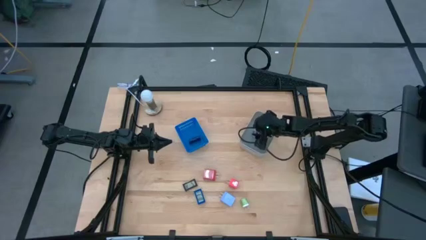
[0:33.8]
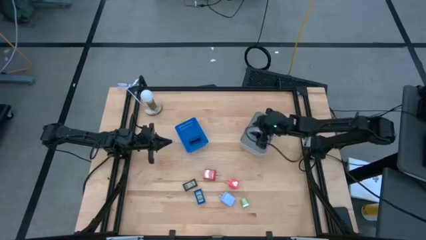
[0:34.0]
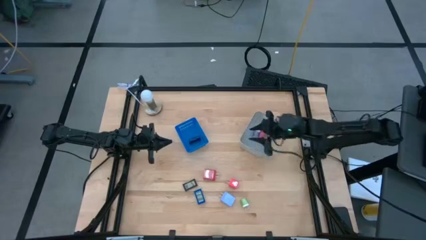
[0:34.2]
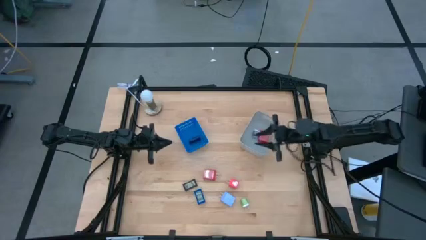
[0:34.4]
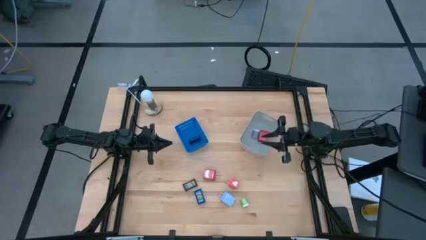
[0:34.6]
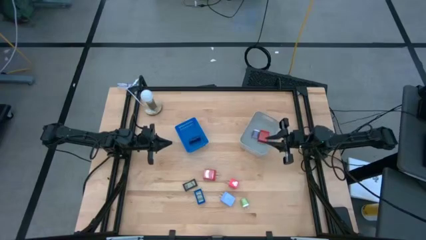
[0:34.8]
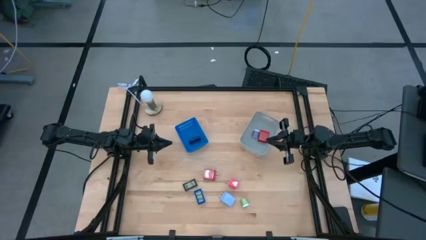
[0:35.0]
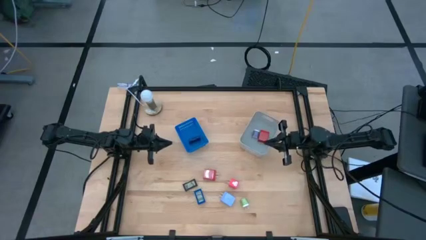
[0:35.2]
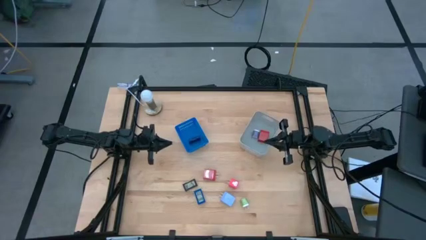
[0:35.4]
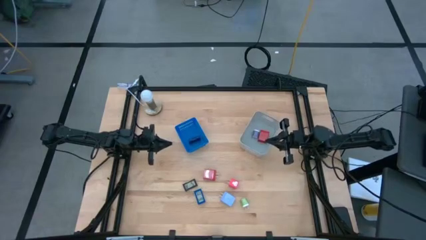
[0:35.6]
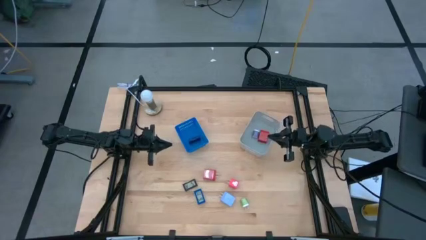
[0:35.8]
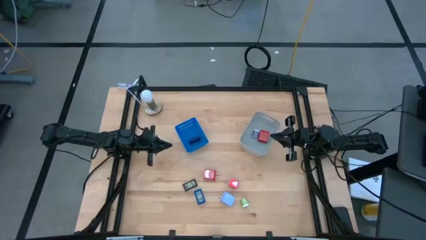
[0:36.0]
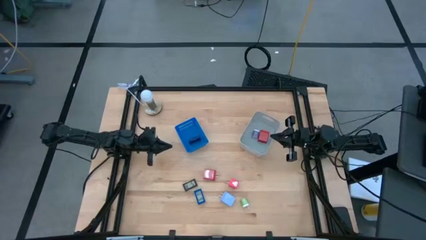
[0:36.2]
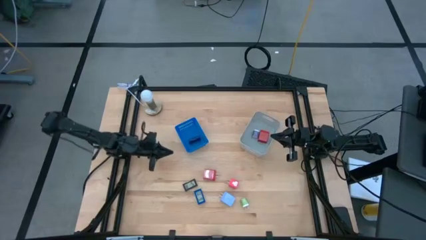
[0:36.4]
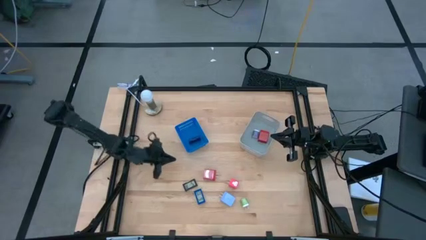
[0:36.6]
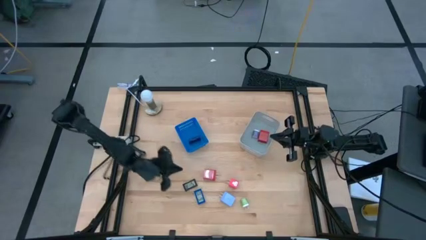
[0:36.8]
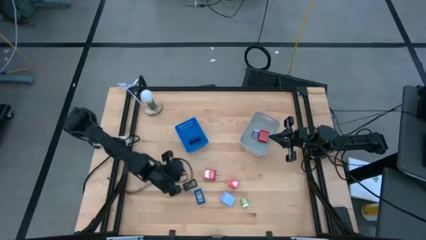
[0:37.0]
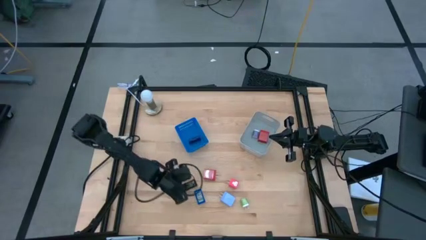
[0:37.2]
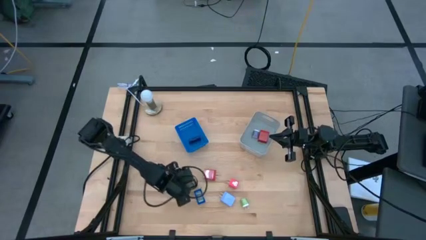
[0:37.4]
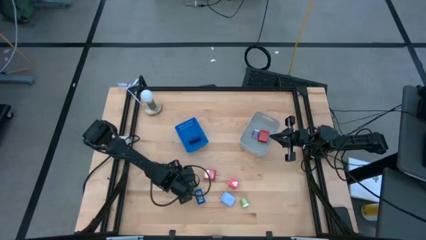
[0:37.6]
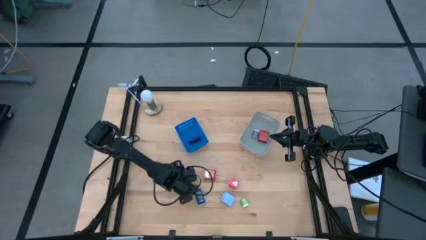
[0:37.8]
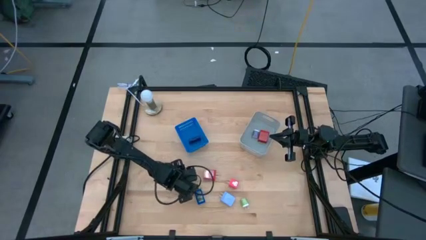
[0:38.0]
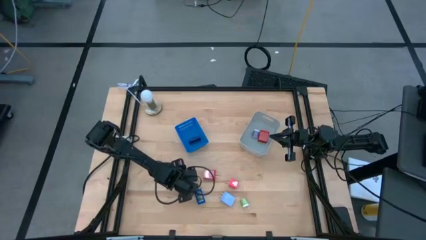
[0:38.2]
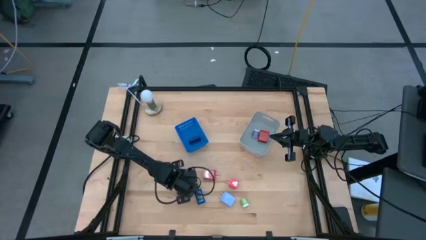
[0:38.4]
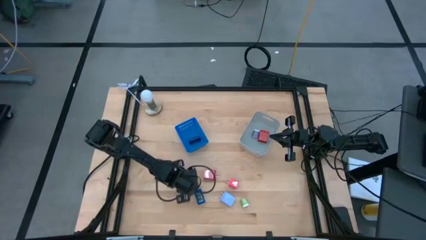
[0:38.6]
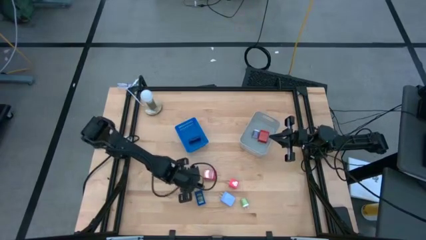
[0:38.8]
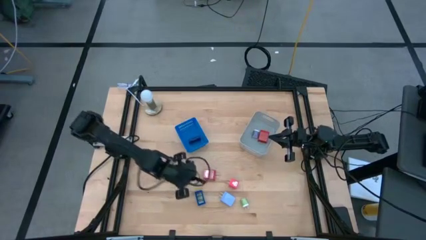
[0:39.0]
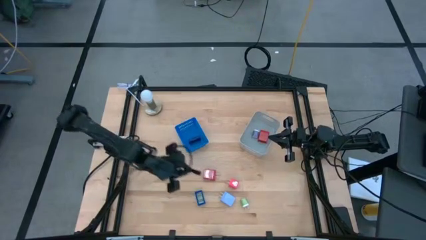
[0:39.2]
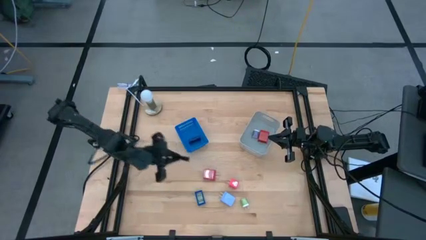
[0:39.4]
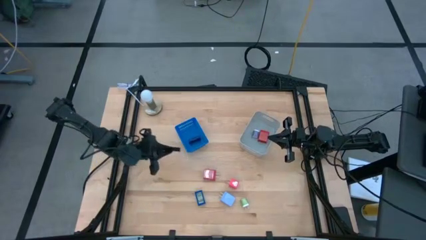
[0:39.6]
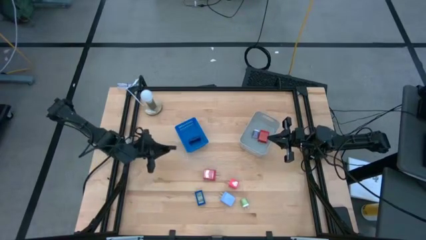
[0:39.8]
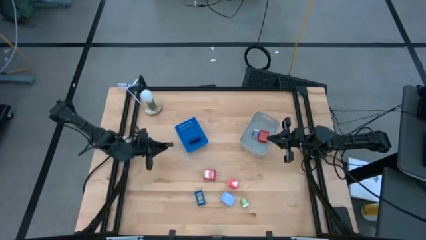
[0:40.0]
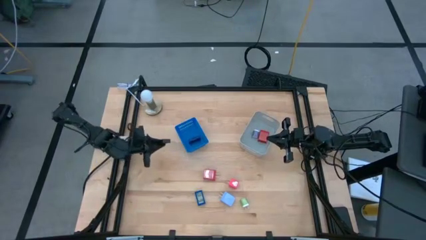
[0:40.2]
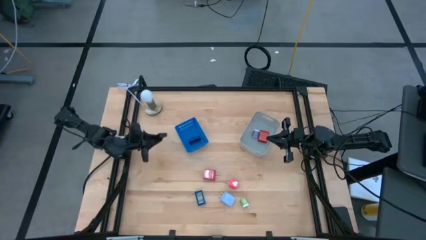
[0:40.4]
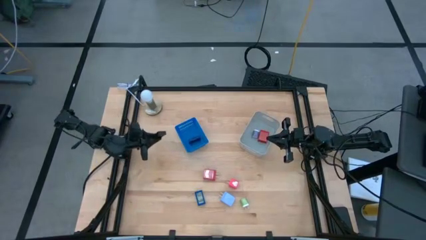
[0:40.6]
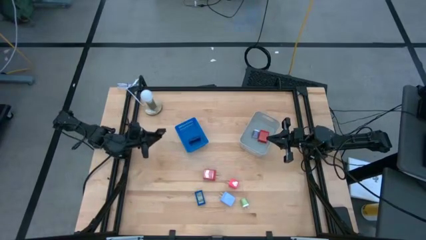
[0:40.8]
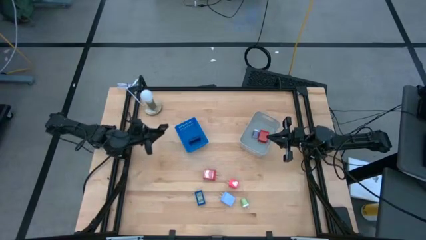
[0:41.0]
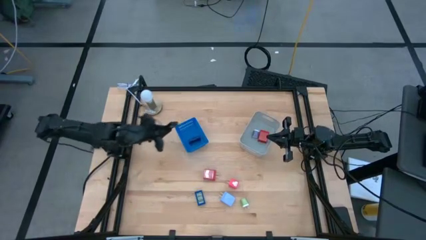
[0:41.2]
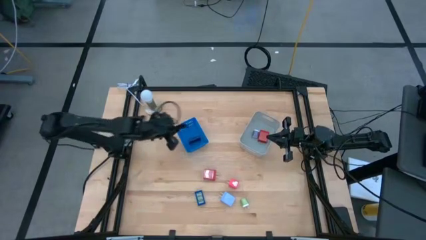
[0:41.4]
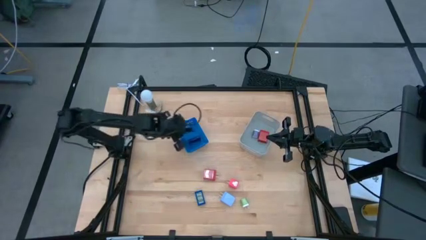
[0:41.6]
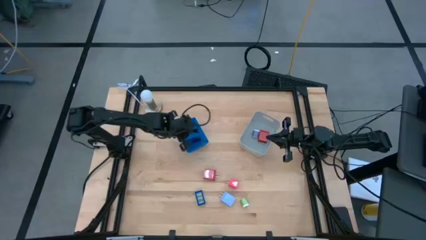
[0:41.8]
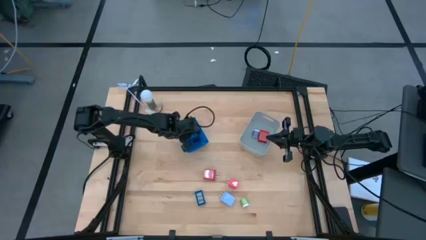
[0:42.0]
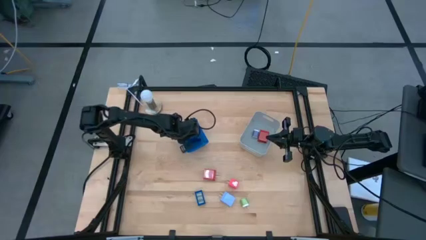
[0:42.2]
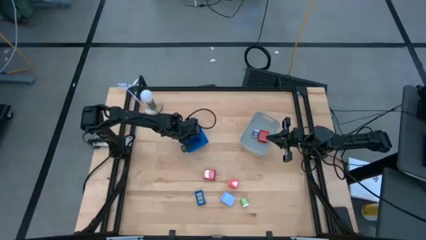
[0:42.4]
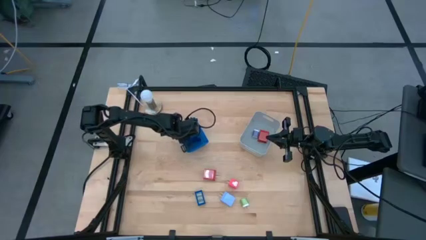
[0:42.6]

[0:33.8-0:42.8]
Task: Pick & Place Office items
Put the black digital clock into the blue bin

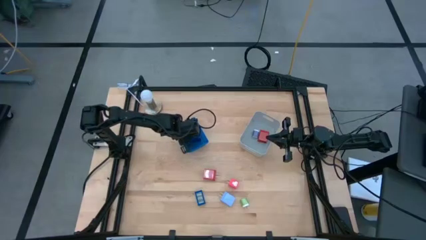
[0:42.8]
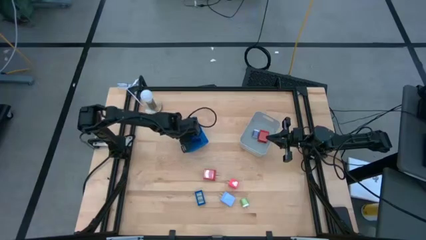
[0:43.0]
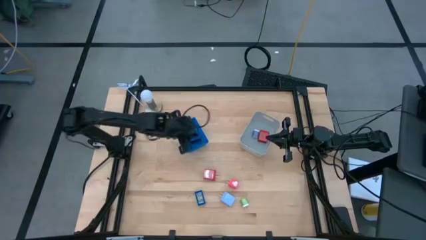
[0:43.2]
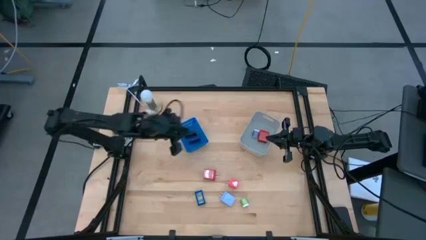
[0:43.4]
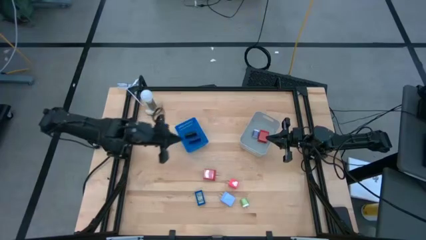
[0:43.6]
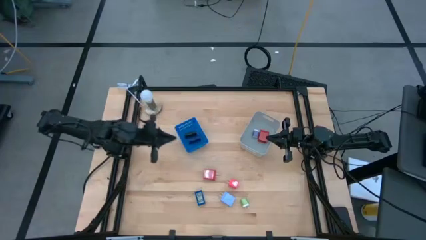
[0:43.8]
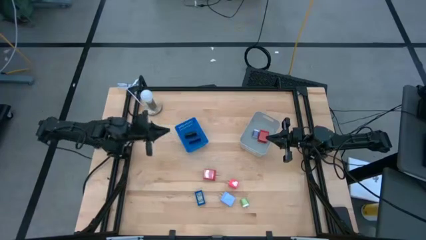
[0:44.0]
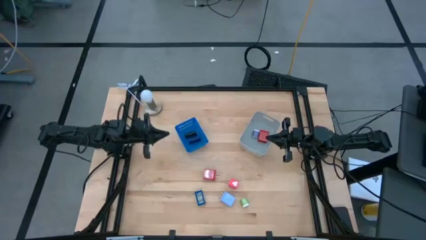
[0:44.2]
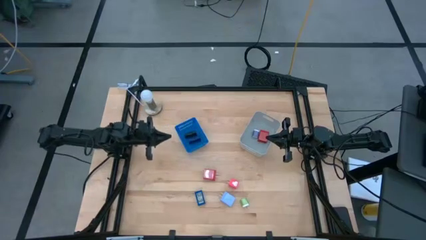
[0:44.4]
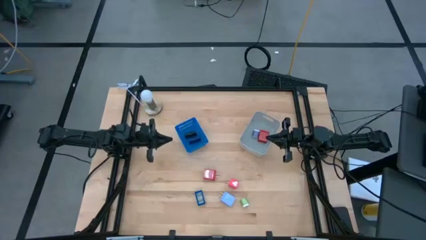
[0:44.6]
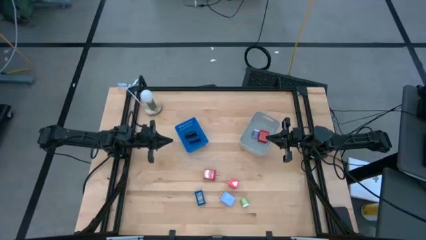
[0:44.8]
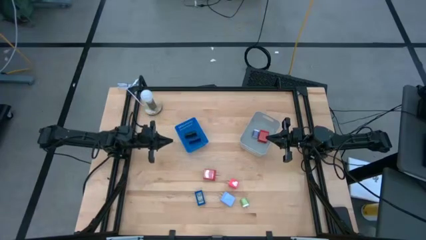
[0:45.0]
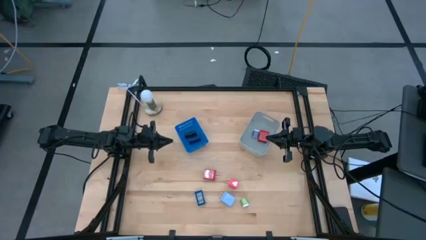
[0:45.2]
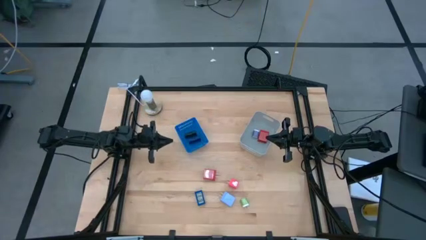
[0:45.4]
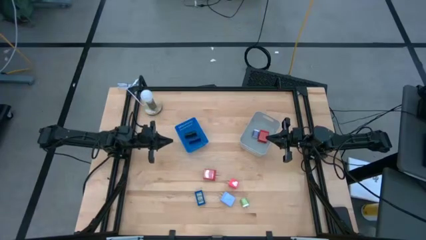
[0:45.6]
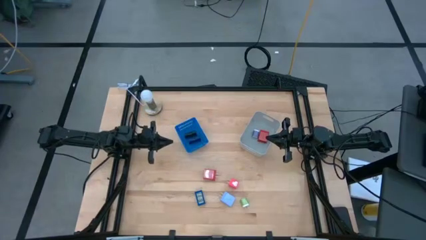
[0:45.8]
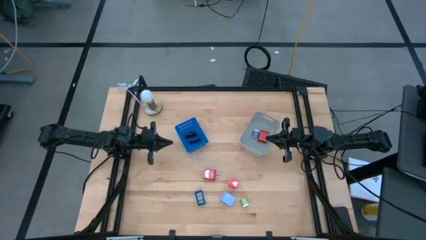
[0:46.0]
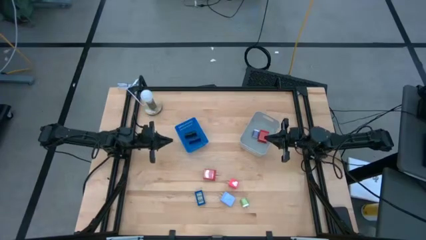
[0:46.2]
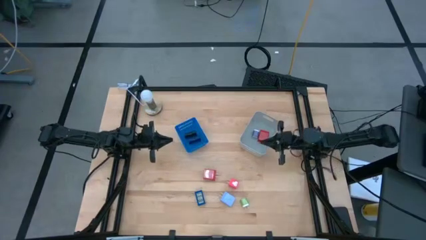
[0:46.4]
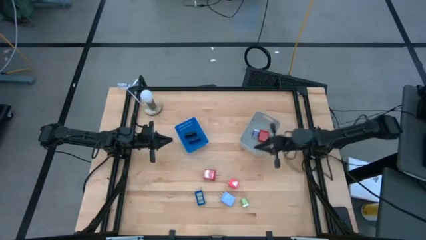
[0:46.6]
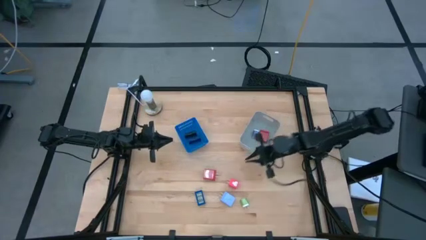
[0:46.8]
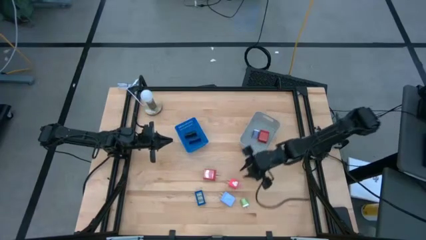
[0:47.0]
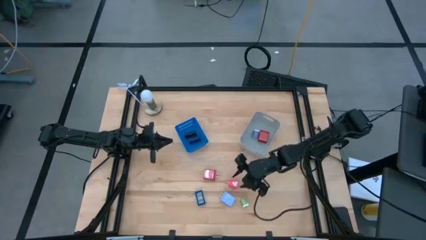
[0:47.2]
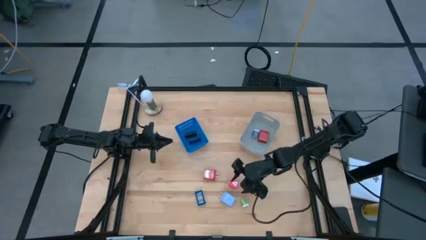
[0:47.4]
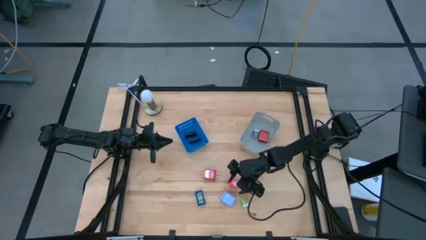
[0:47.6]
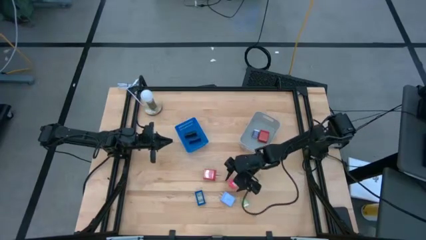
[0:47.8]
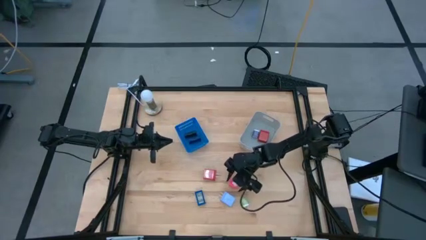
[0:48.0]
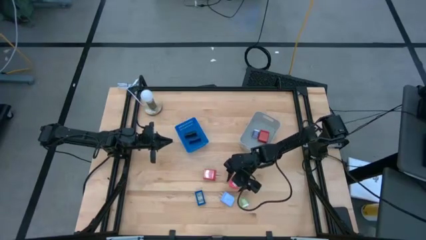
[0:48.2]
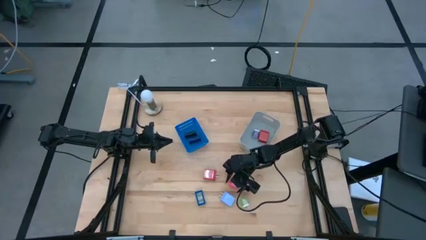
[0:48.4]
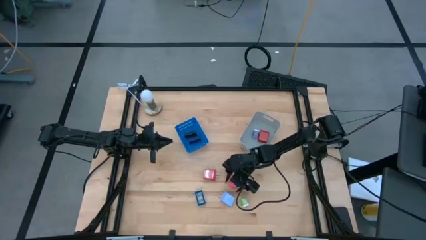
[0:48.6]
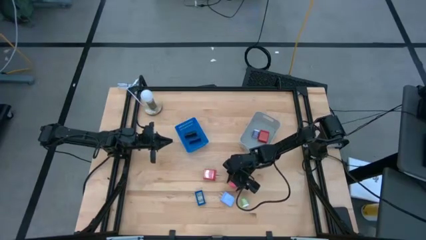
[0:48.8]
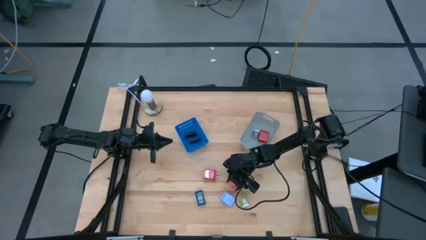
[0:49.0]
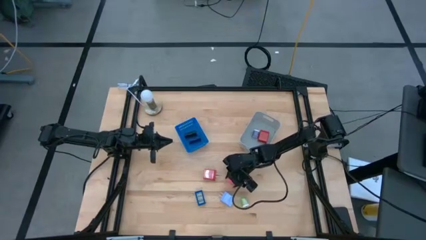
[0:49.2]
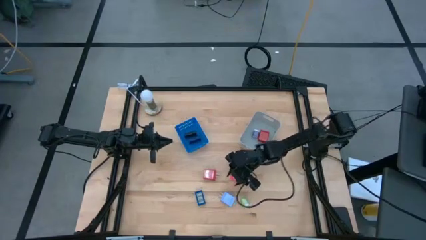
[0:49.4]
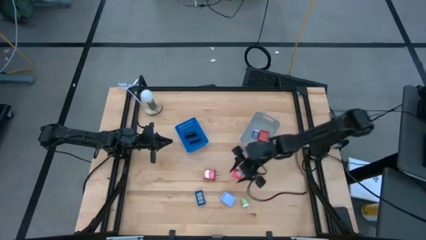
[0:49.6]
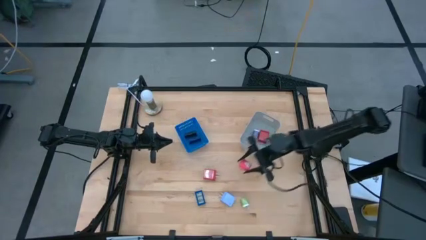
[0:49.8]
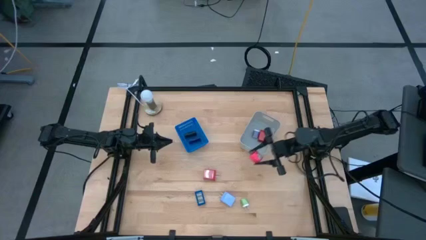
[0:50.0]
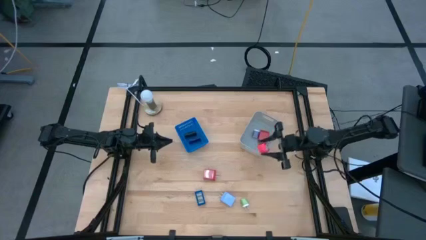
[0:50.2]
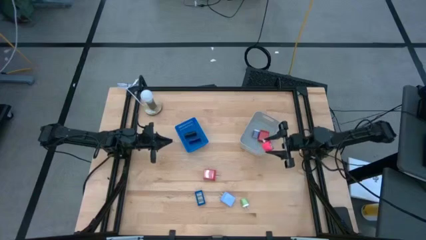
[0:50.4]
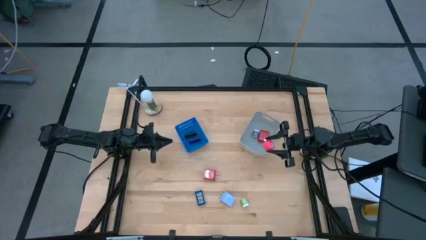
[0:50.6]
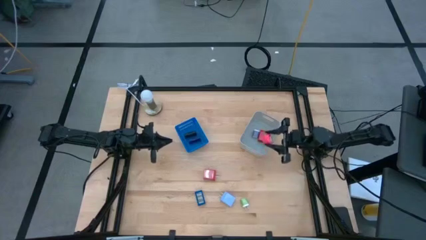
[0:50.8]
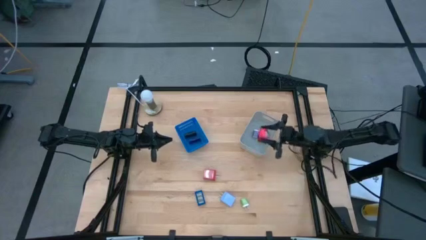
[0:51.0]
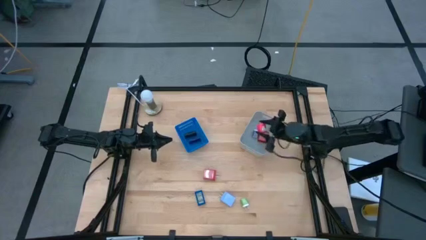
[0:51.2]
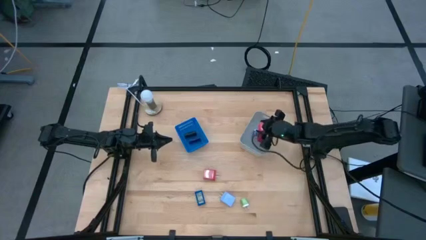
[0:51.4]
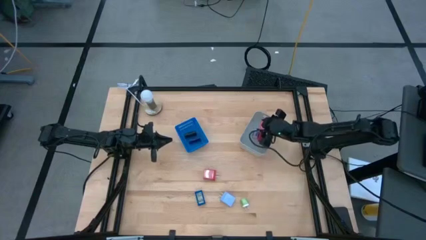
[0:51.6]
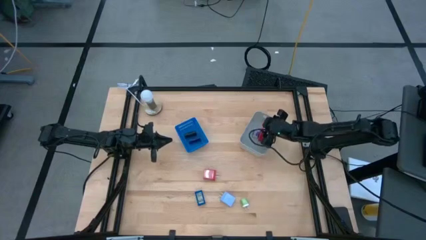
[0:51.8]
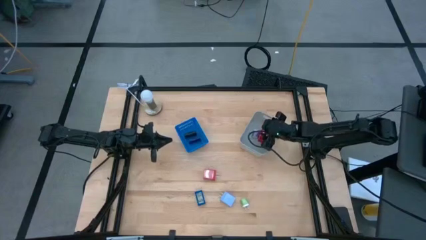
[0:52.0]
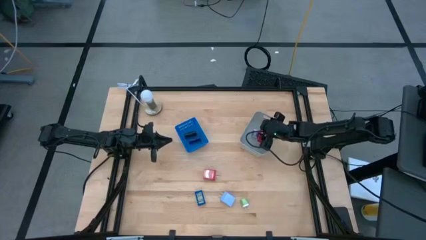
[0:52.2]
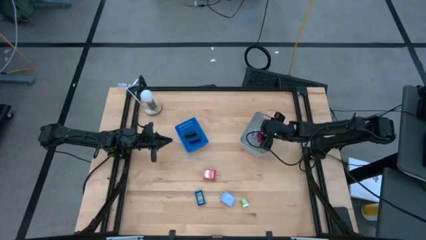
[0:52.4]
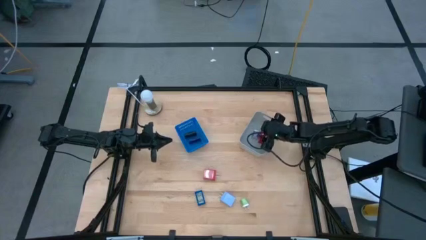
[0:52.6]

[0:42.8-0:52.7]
Put the pink charger adapter into the gray bin
